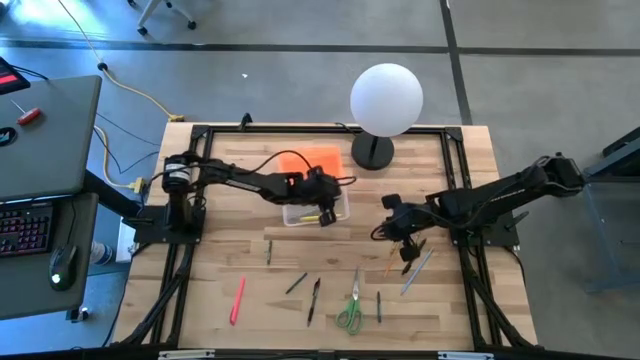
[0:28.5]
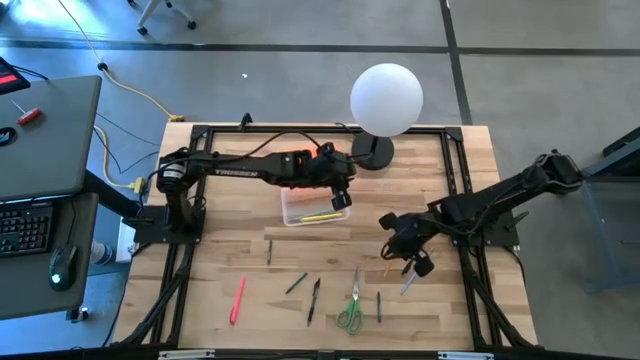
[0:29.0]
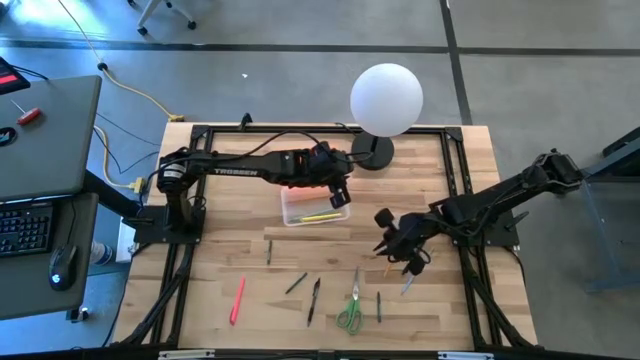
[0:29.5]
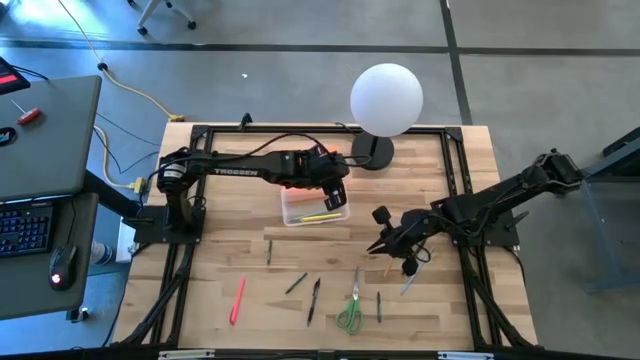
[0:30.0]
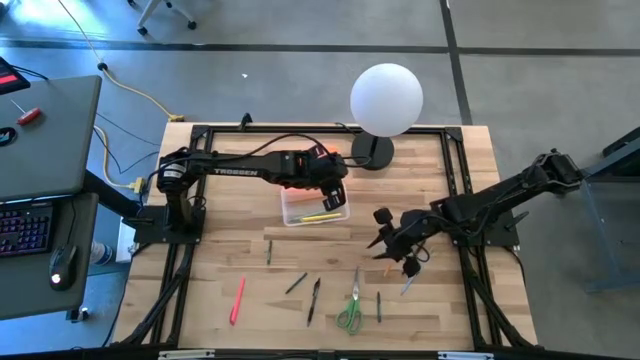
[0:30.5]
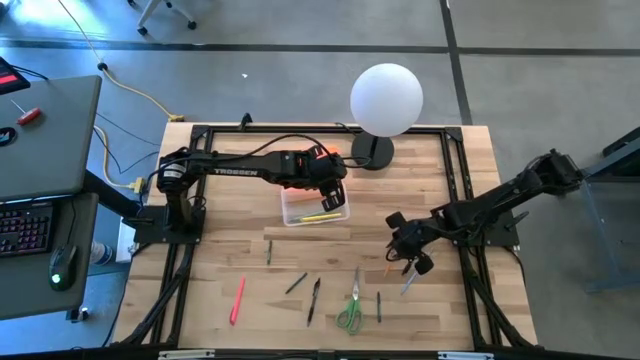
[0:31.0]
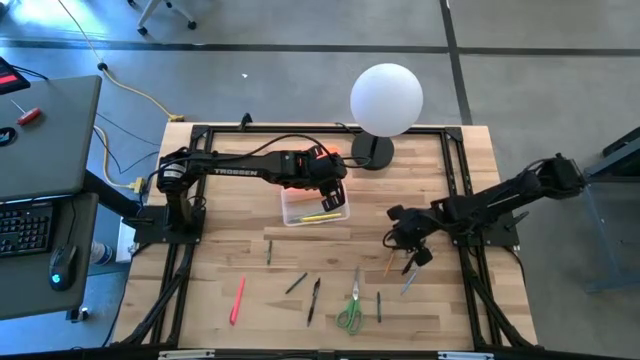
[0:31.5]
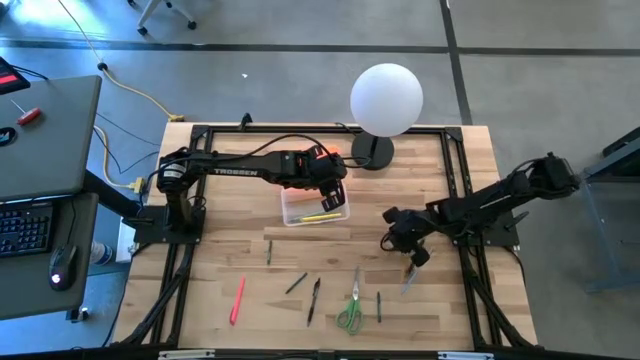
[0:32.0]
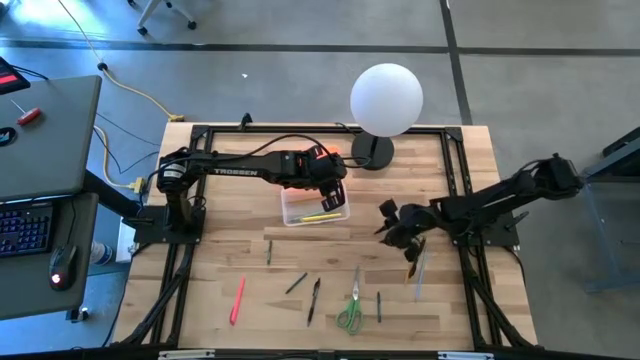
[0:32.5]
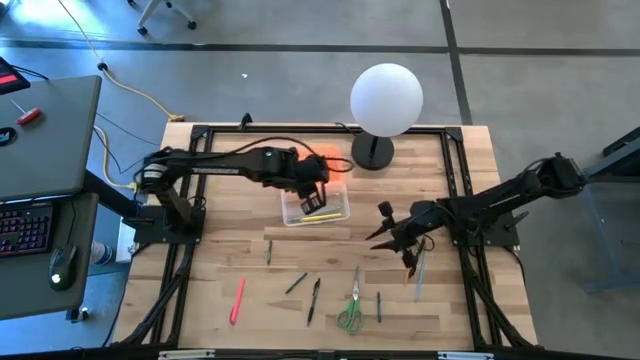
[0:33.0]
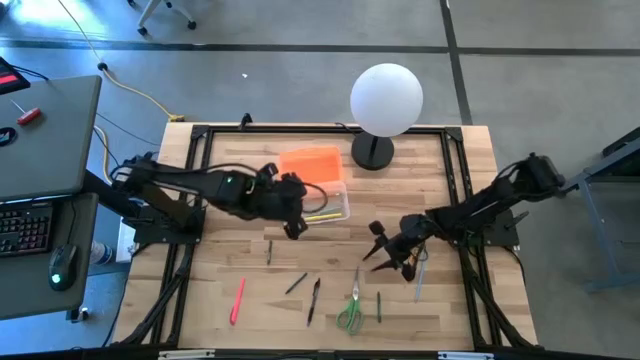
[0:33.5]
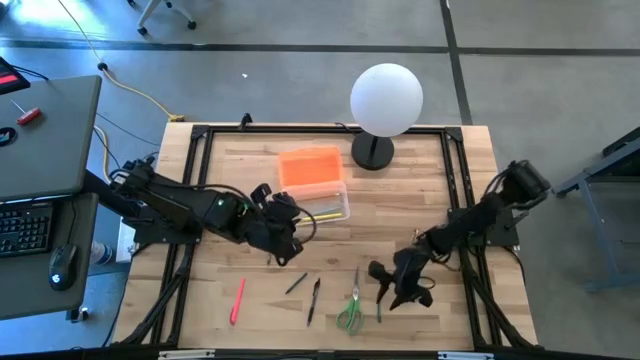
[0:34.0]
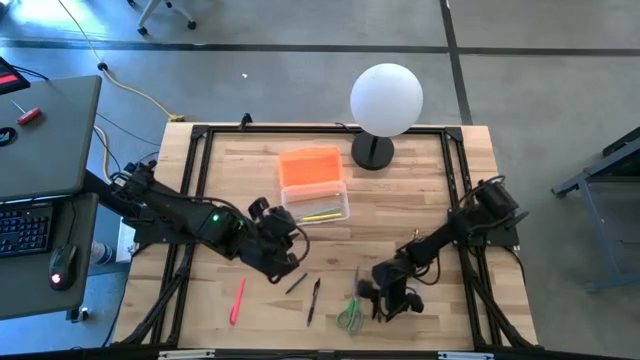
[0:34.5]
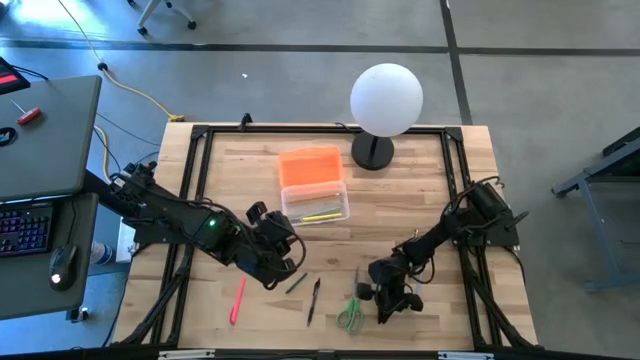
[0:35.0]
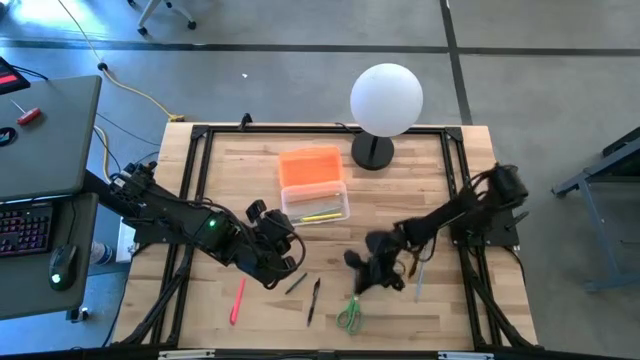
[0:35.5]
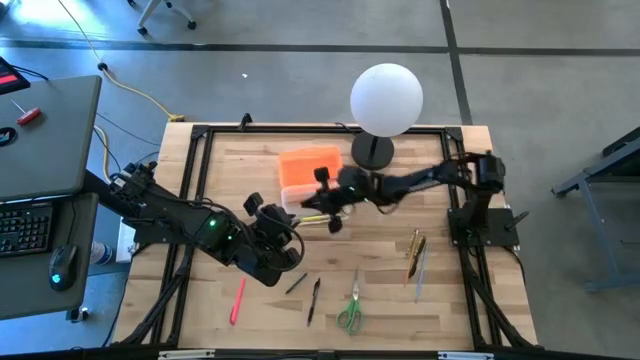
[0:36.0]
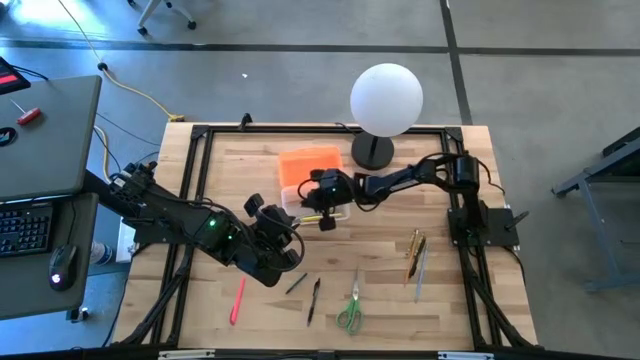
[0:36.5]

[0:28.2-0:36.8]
Task: Pick & place school supplies into a supply box
Put the green pen into the transparent supply box

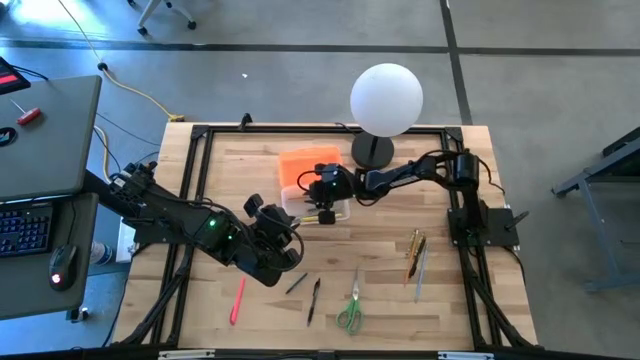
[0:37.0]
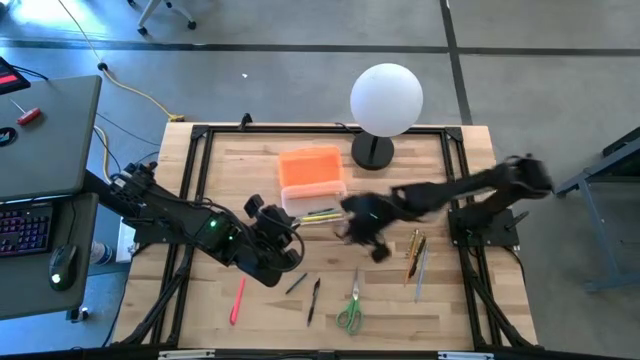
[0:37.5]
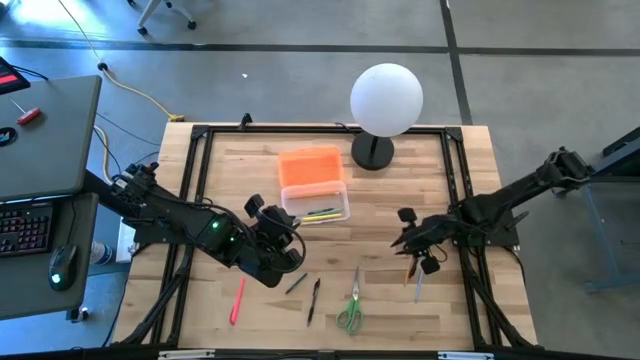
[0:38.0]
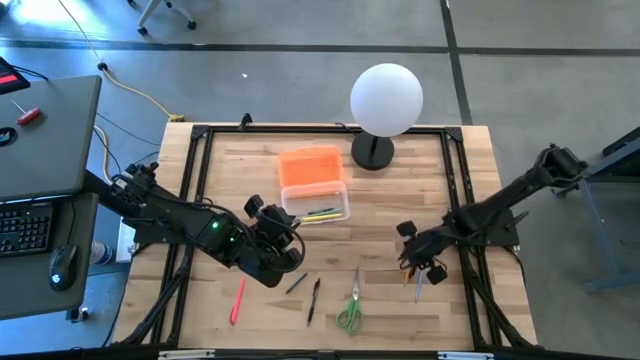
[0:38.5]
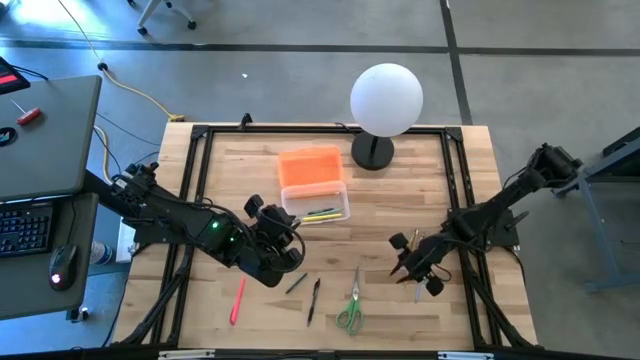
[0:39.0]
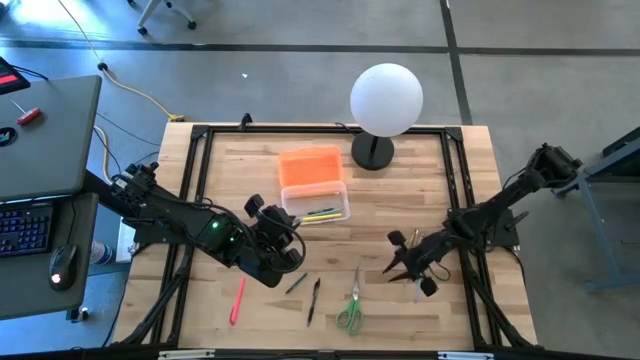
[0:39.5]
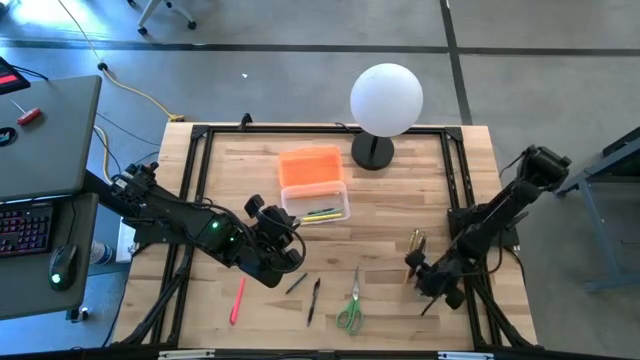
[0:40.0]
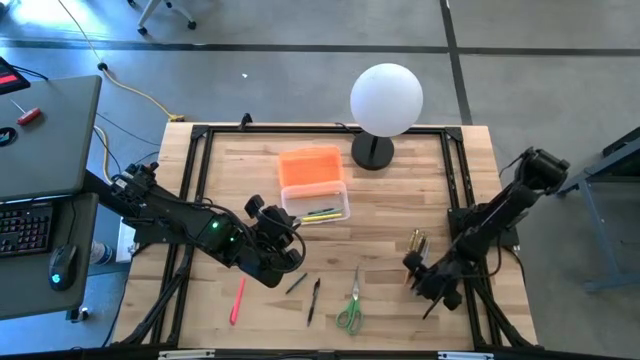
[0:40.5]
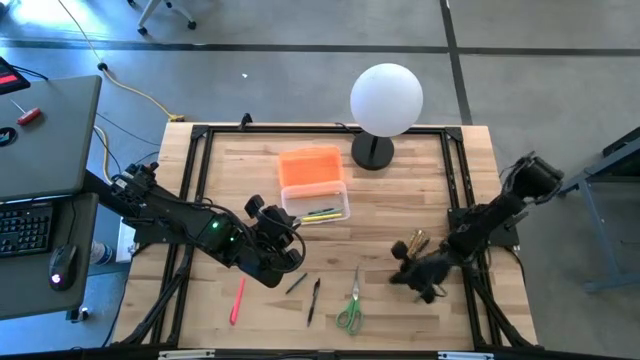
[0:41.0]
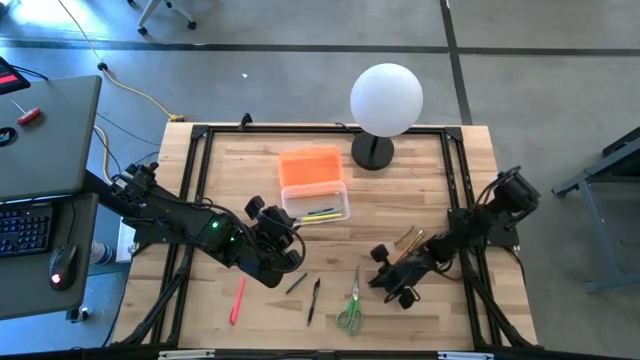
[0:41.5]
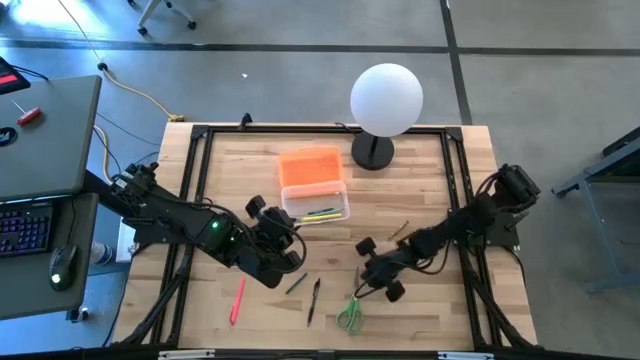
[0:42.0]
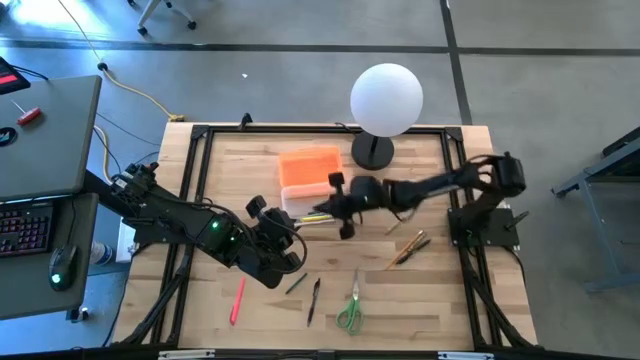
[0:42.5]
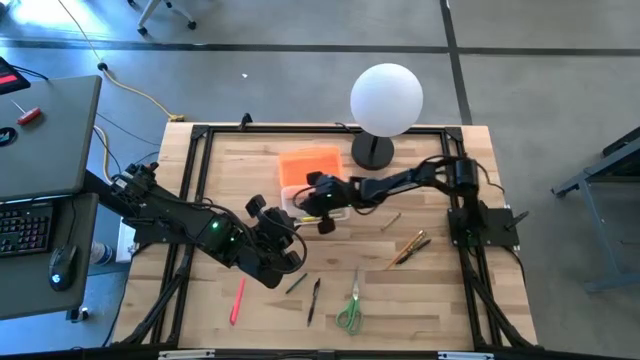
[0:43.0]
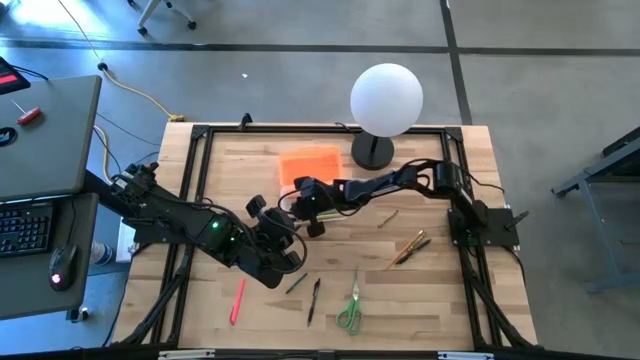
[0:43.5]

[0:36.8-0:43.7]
Put the blue pencil into the transparent supply box

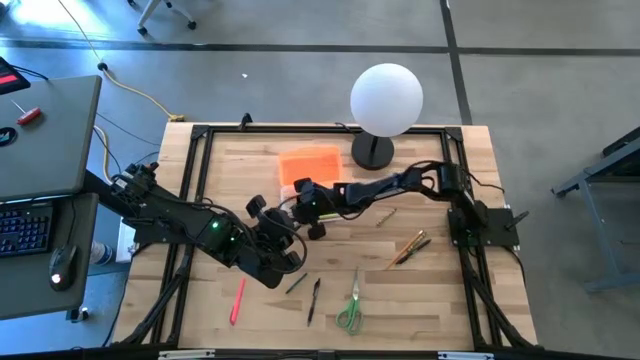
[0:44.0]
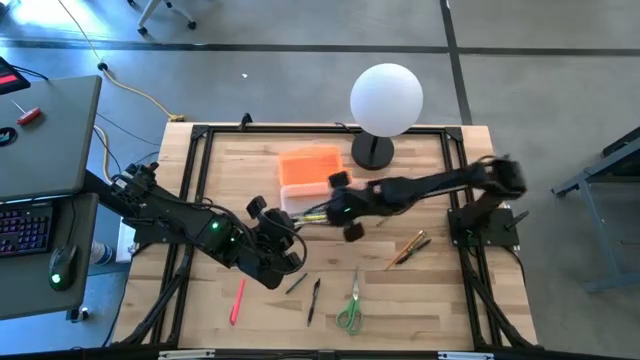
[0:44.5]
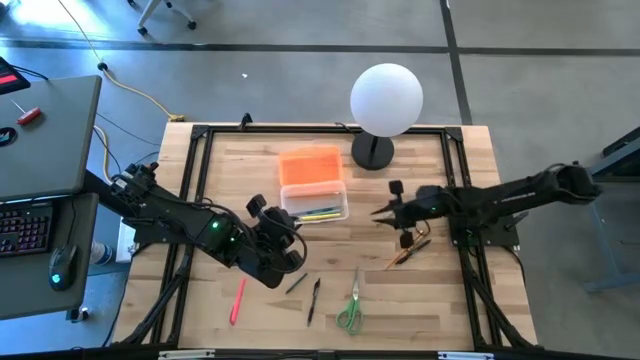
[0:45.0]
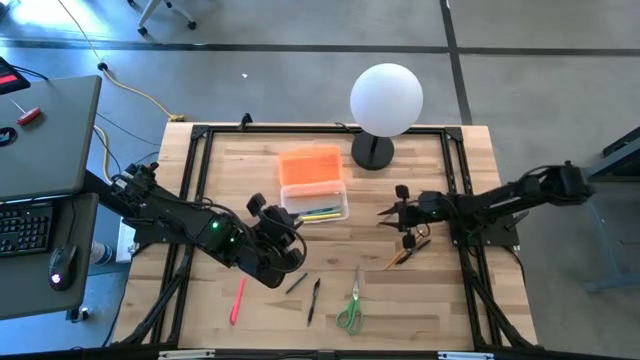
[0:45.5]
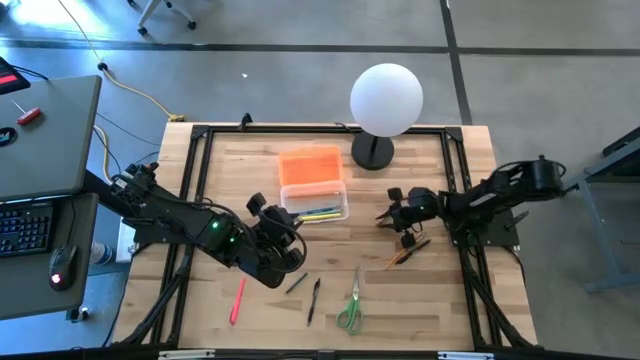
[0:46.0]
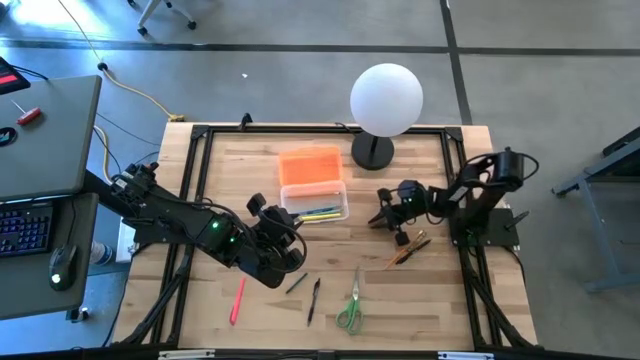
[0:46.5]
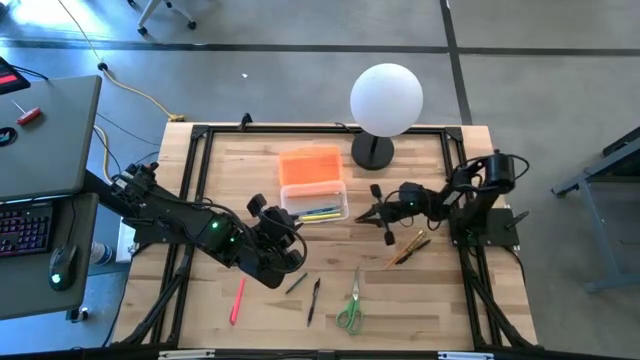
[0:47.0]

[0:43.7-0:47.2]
Put the top green crayon into the transparent supply box

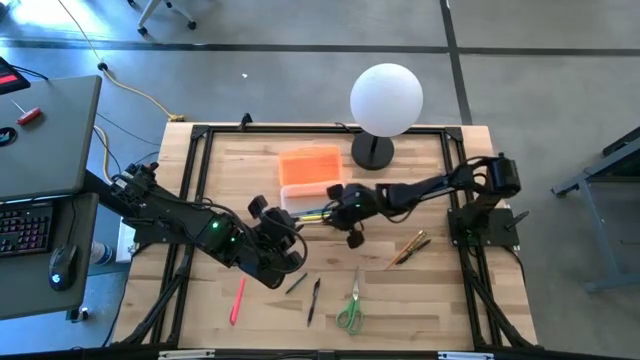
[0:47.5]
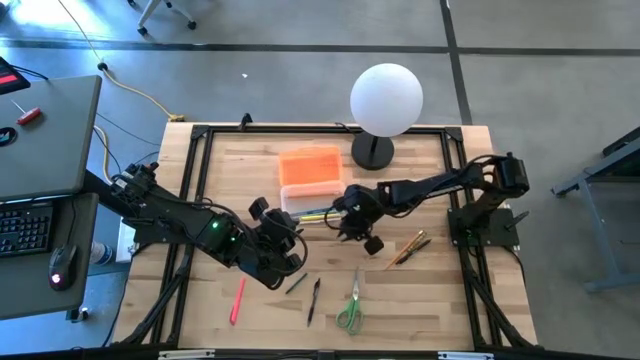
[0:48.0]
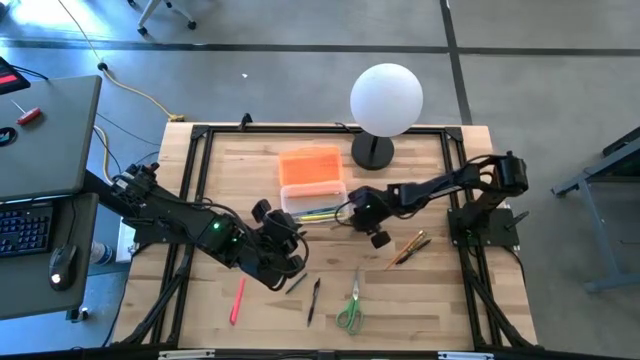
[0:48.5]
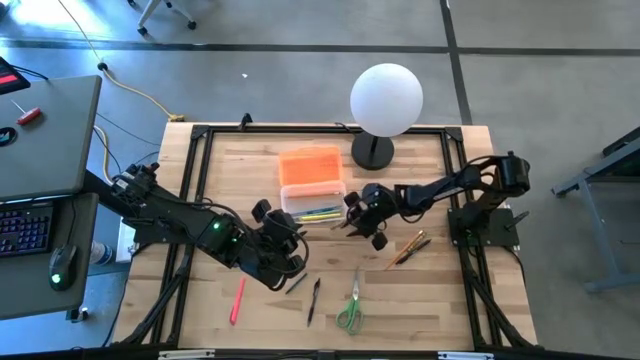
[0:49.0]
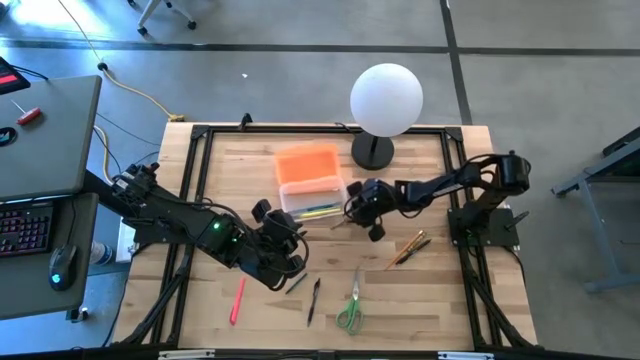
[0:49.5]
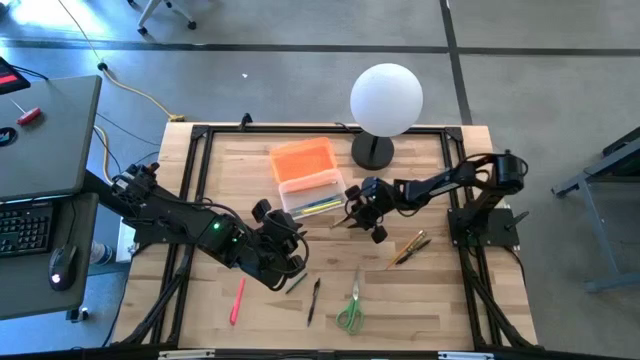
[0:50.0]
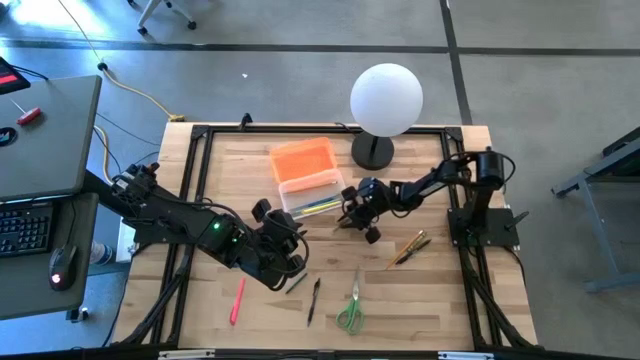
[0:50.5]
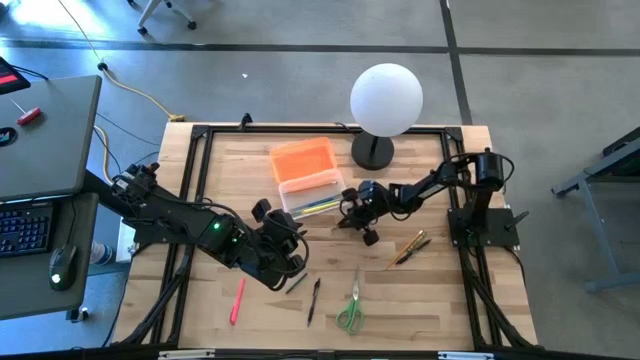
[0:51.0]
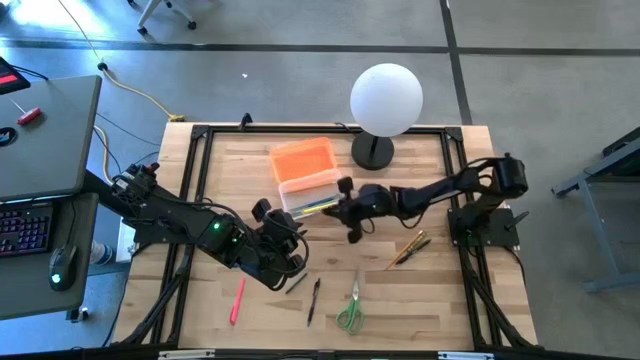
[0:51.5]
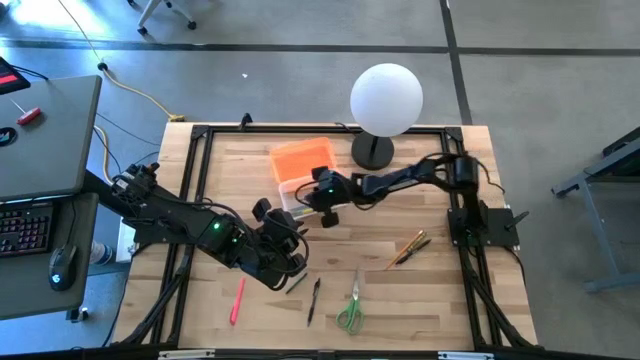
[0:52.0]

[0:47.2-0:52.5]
Put the top green crayon into the transparent supply box
